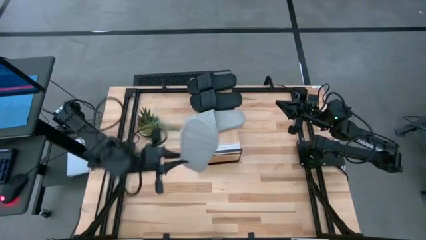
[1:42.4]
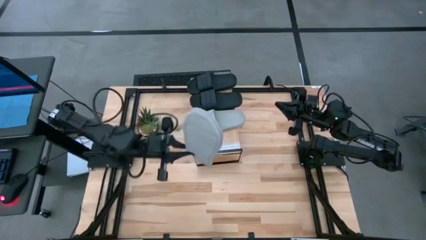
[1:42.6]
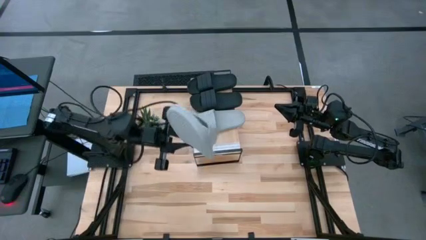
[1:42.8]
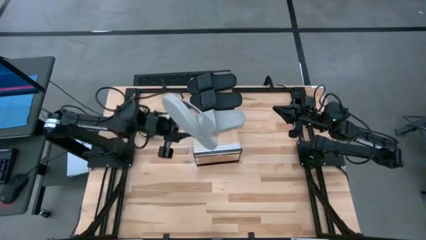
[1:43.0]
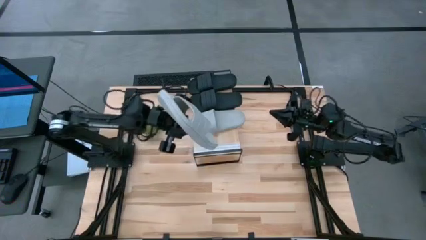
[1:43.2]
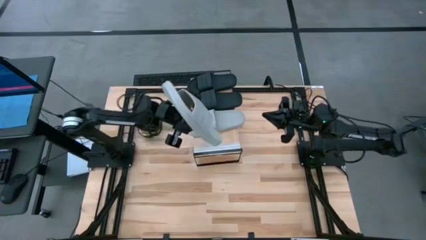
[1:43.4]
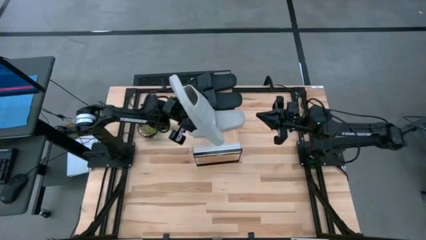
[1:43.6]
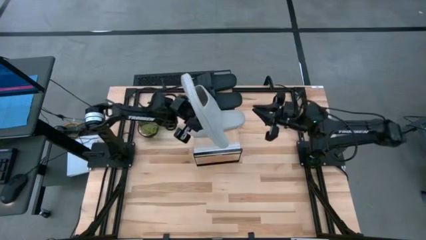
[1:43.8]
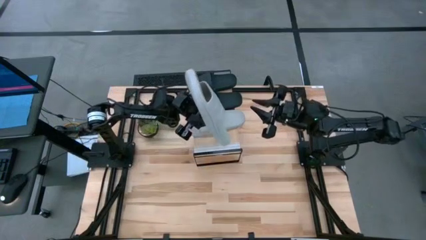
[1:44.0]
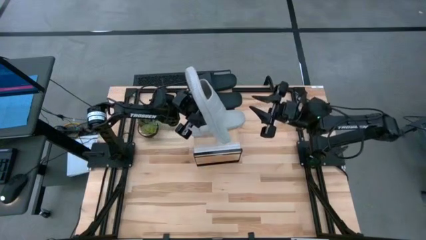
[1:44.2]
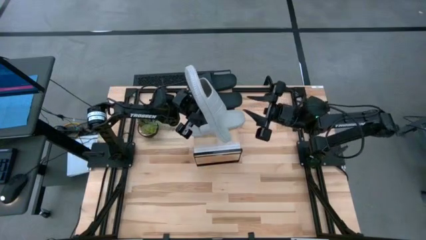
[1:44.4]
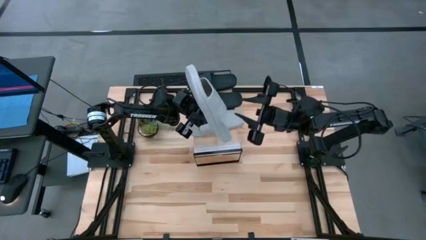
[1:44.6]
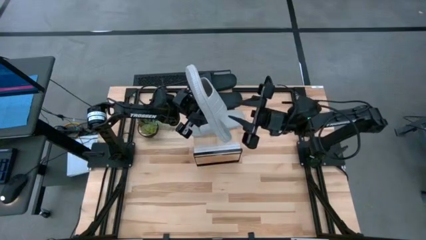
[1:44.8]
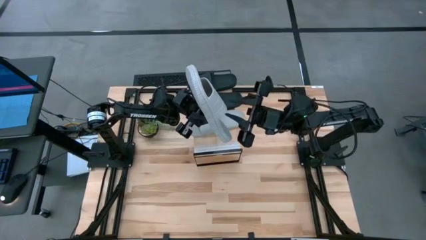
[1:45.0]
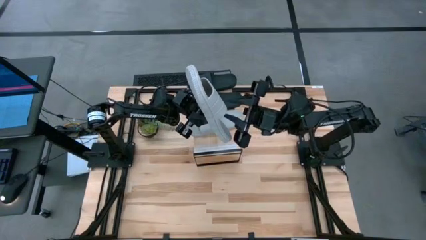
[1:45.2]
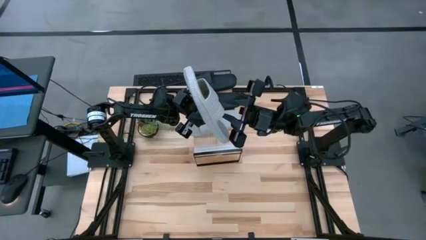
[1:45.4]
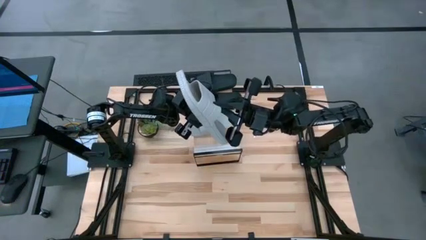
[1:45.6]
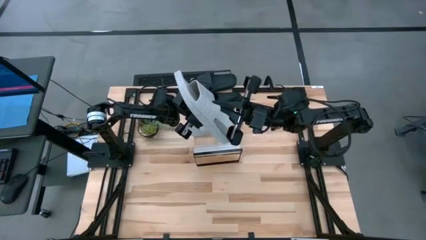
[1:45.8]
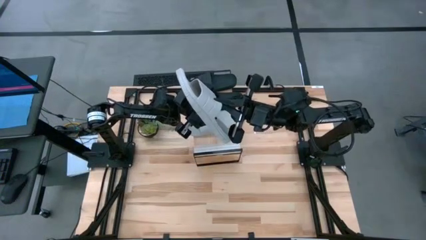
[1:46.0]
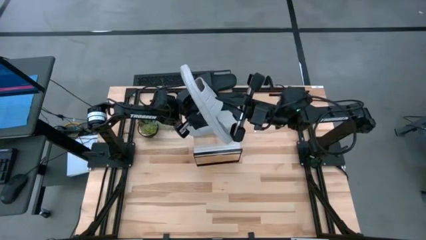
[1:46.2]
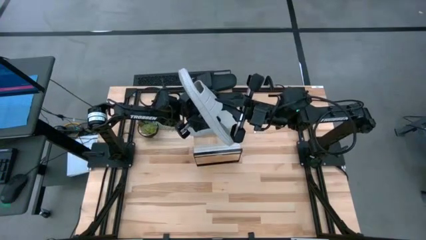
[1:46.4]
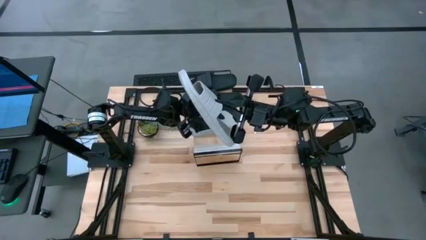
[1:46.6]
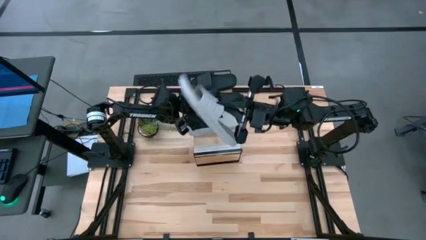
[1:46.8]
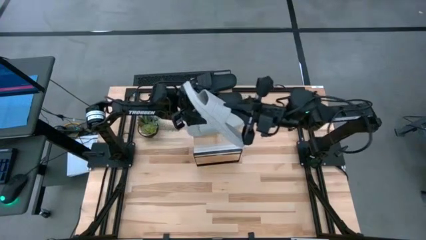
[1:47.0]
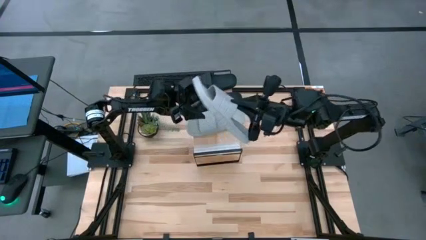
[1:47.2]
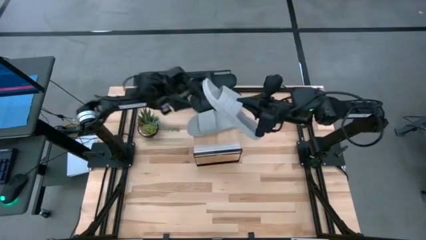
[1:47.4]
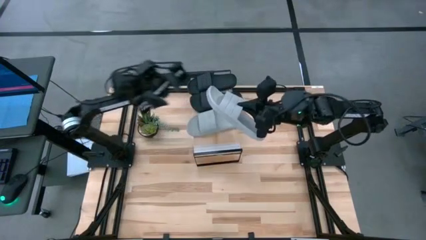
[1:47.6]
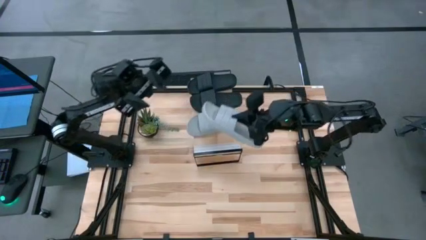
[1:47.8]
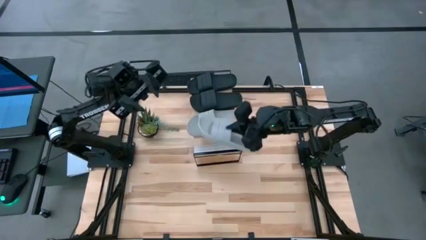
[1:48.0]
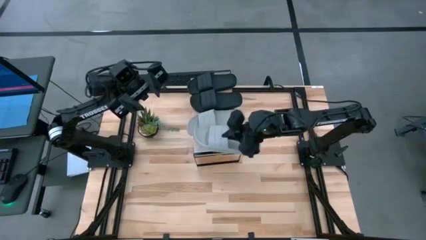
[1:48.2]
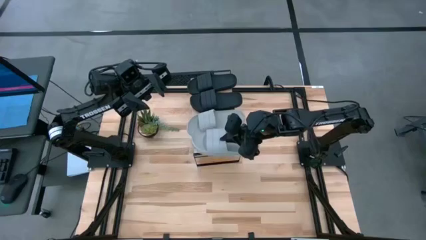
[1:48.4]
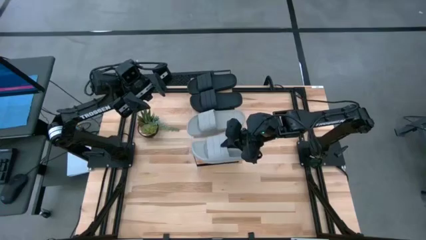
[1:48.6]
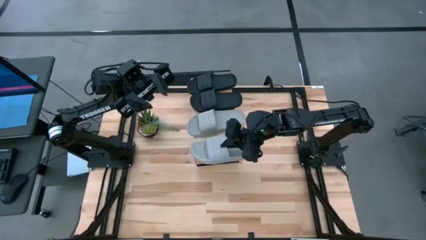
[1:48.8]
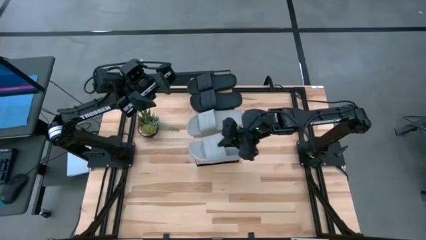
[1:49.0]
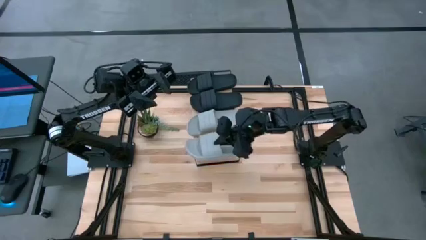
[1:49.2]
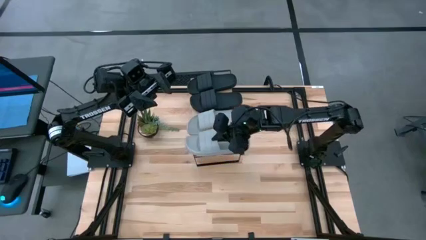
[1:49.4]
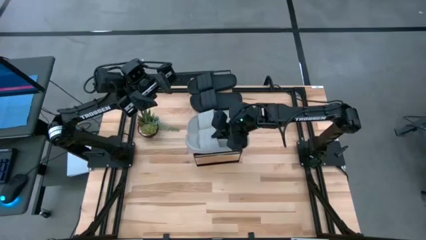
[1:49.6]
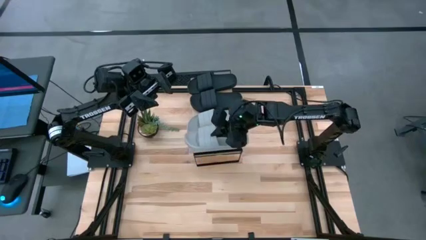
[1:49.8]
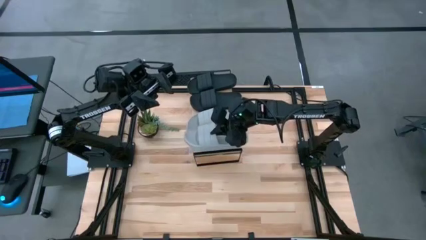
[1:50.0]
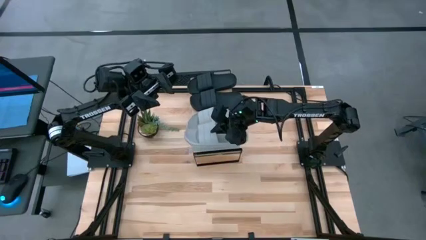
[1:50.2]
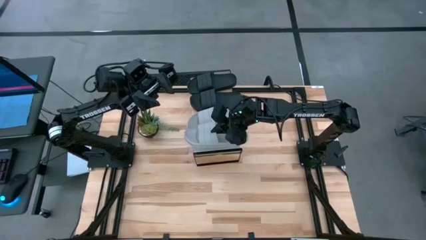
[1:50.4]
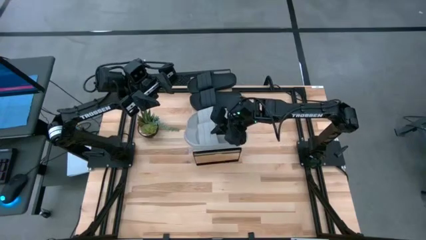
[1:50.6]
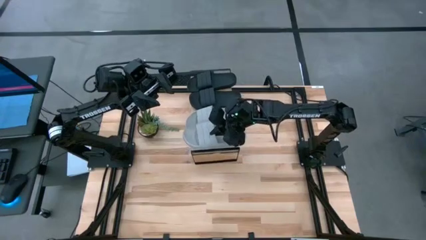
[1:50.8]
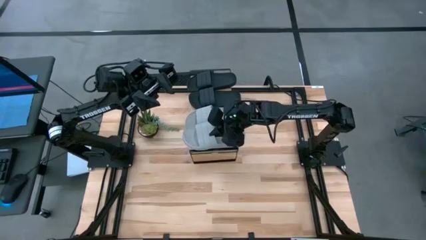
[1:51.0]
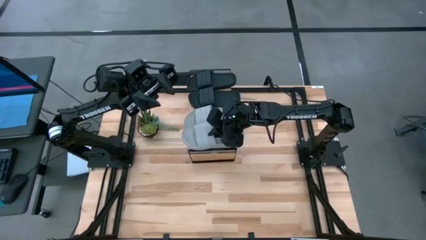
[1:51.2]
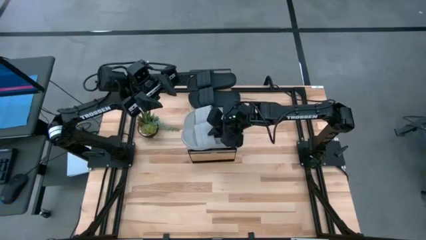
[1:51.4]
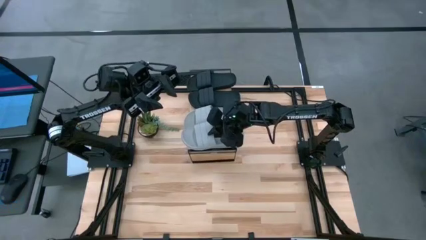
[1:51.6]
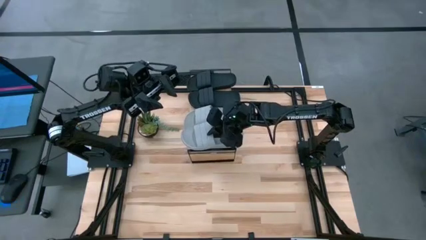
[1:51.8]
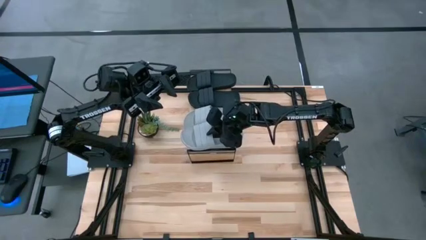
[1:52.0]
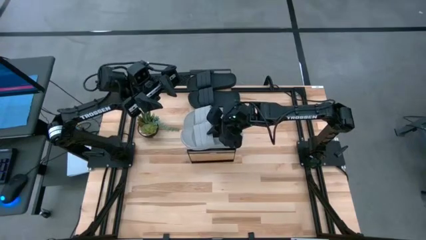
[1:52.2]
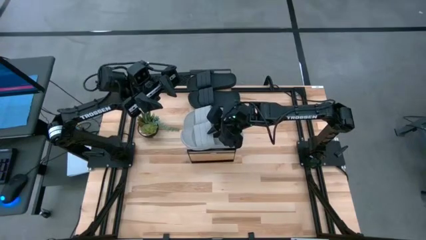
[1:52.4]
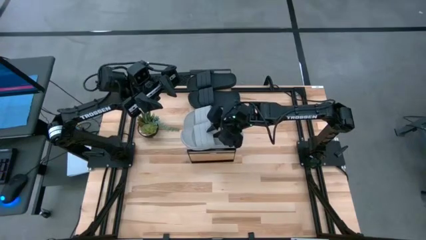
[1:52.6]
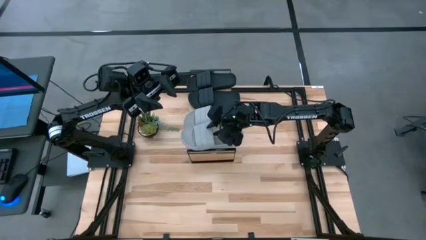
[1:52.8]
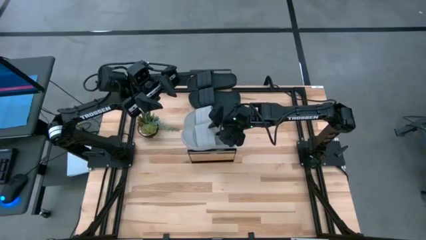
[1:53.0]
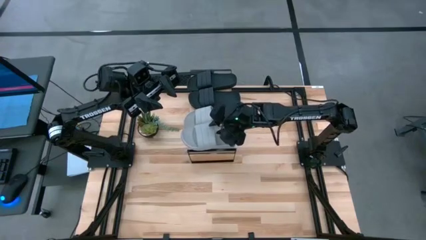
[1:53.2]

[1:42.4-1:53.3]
Task: Pick and place slides into the shelf
Put the gray slide on the shelf

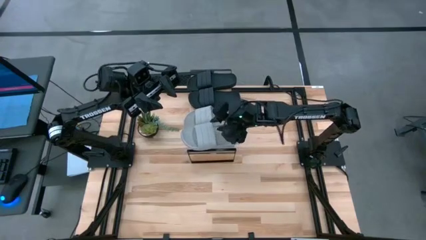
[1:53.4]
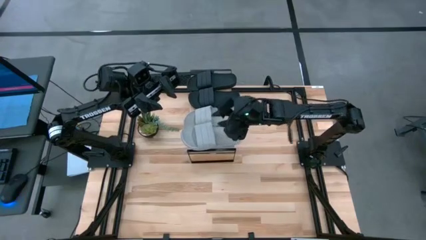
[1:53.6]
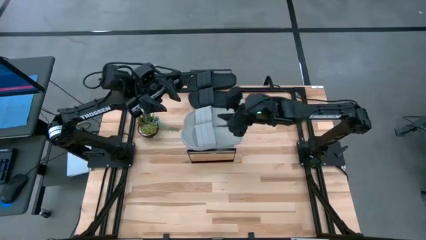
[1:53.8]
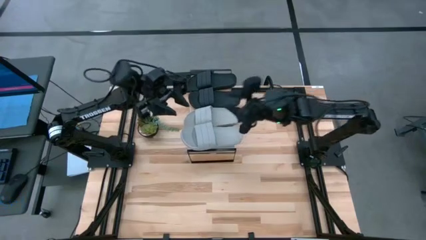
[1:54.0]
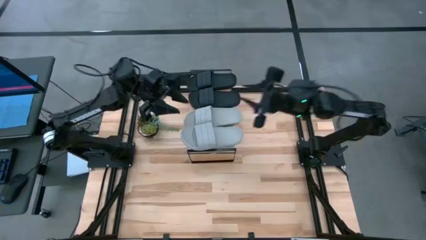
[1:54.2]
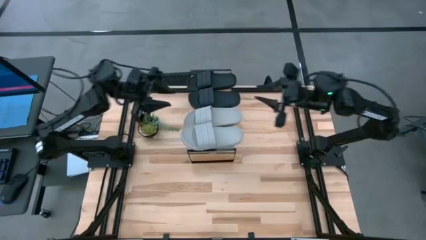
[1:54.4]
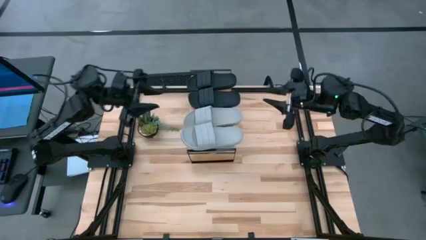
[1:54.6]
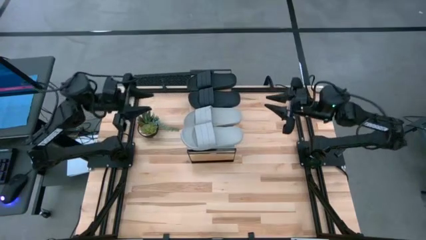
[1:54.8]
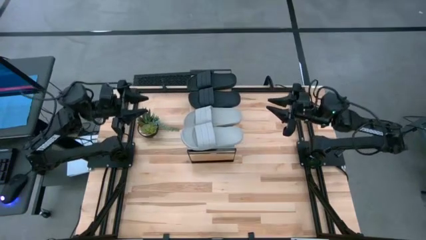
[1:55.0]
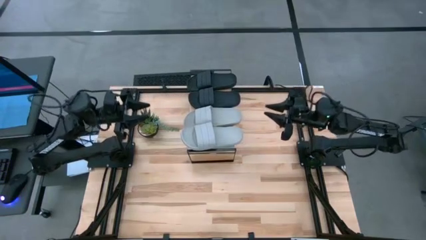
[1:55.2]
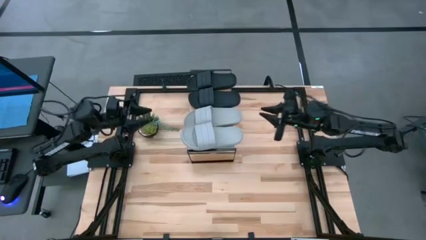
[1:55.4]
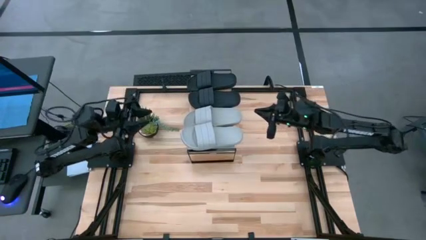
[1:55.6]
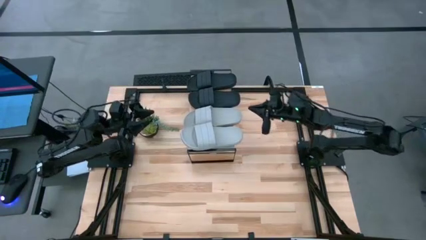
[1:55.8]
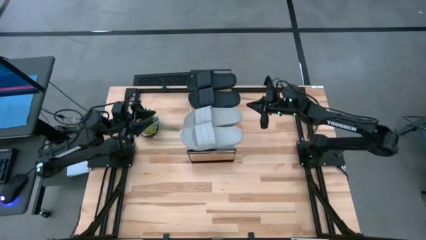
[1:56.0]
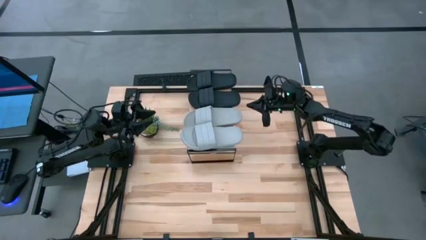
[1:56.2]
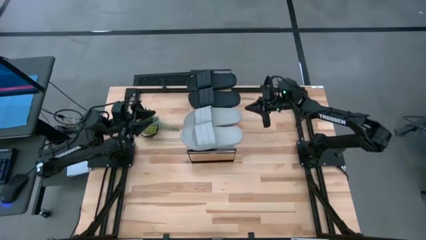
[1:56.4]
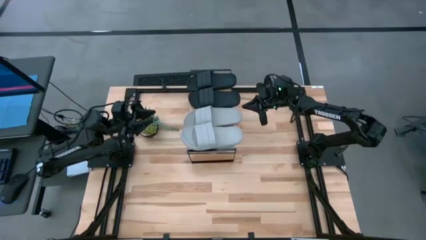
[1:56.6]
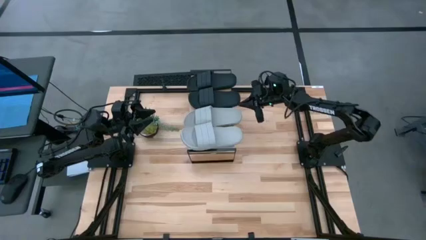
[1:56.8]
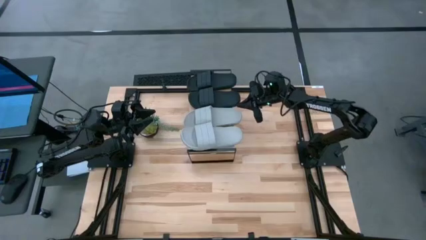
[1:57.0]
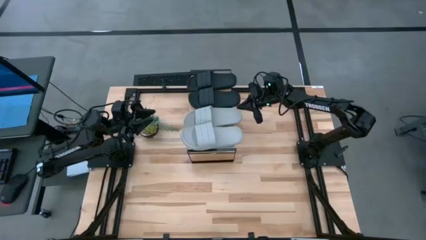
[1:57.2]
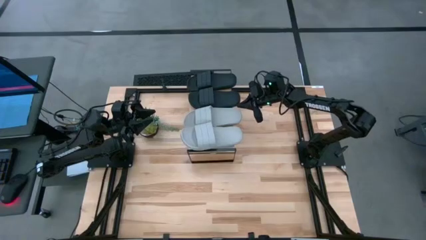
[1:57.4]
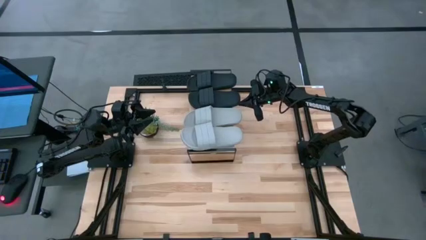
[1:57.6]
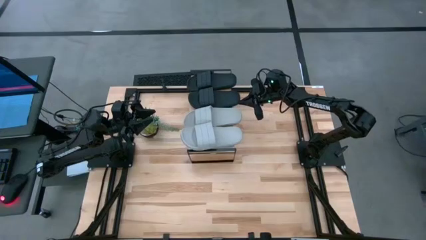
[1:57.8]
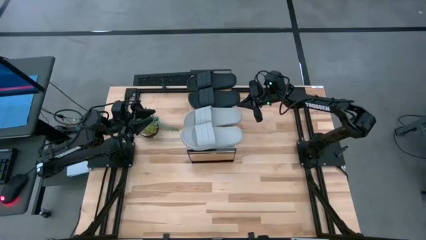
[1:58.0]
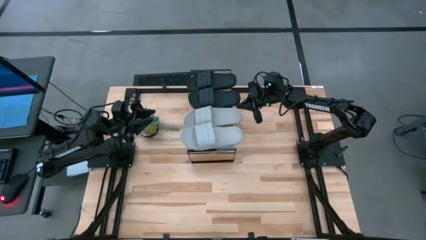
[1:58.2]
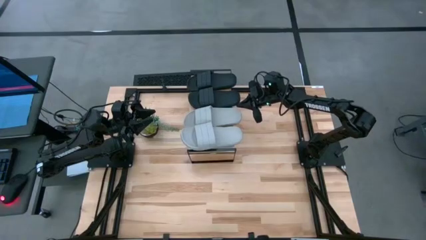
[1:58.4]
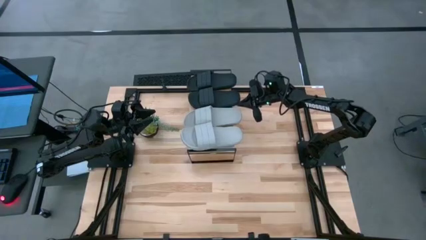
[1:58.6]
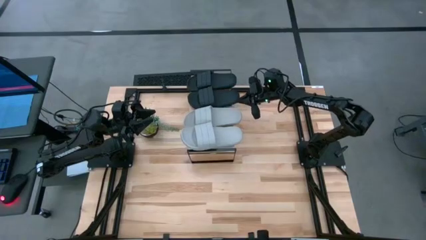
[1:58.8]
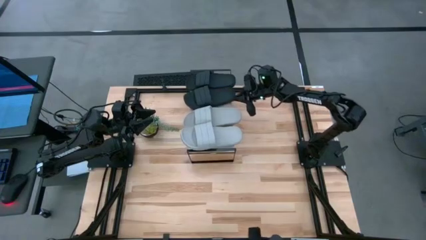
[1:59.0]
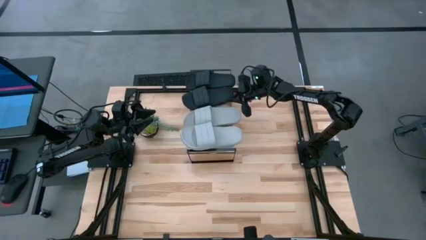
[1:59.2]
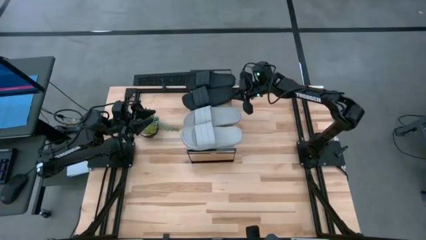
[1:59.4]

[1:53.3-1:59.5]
Adjust the bottom black slide on the shelf
